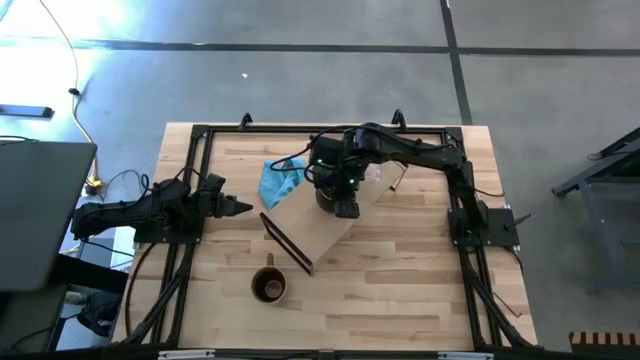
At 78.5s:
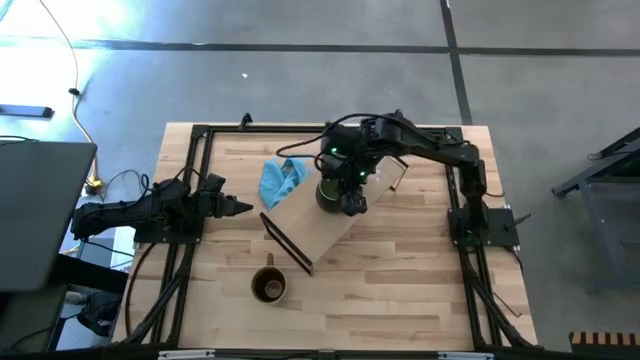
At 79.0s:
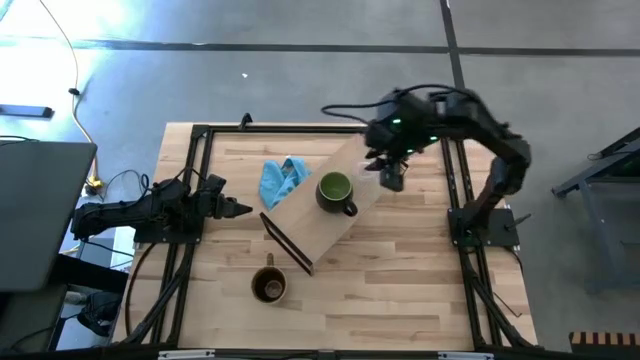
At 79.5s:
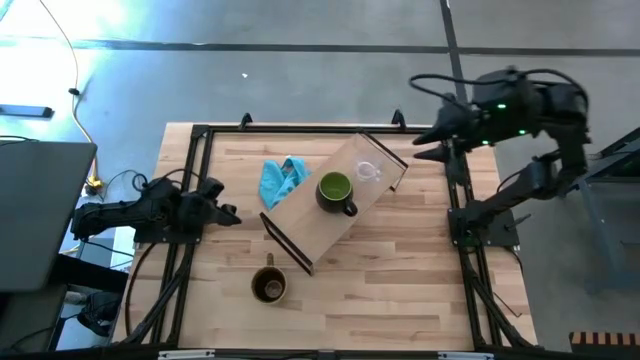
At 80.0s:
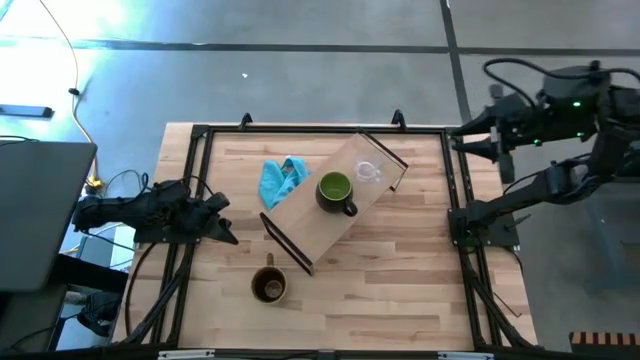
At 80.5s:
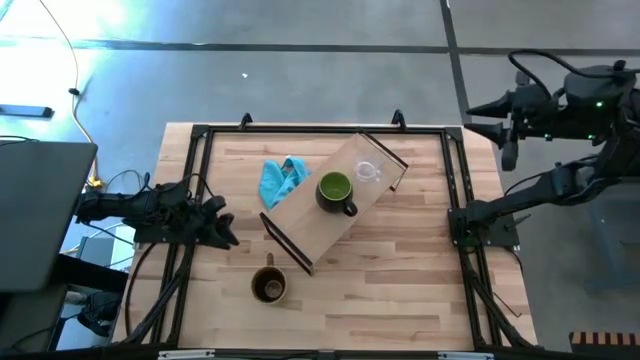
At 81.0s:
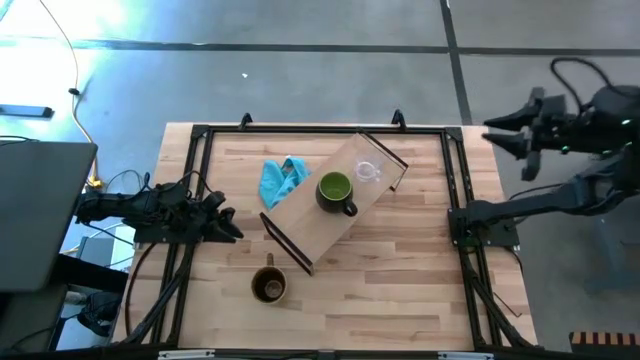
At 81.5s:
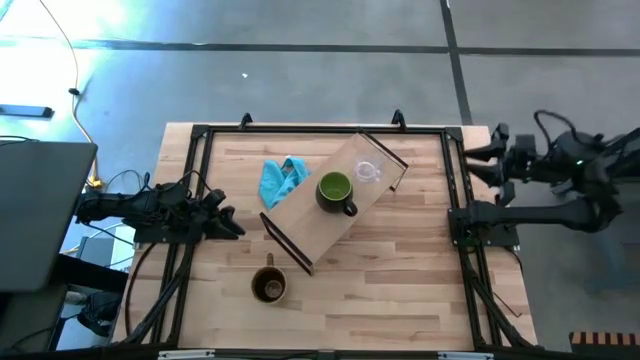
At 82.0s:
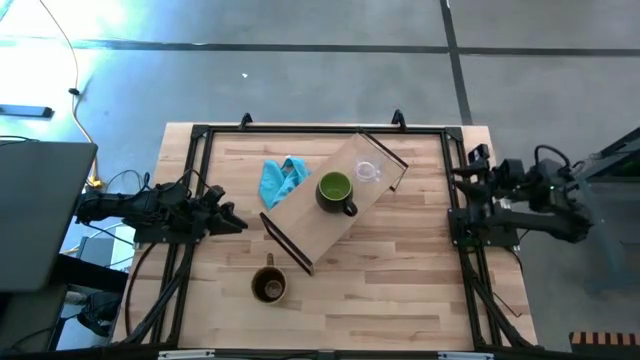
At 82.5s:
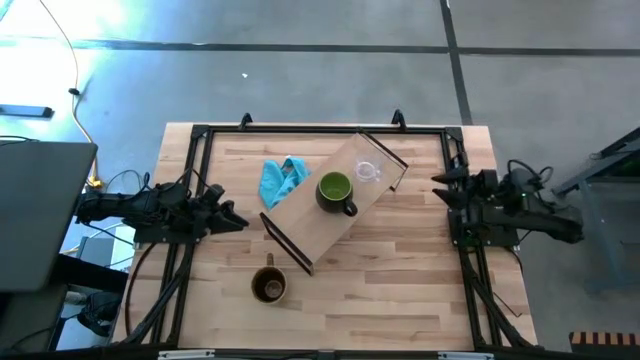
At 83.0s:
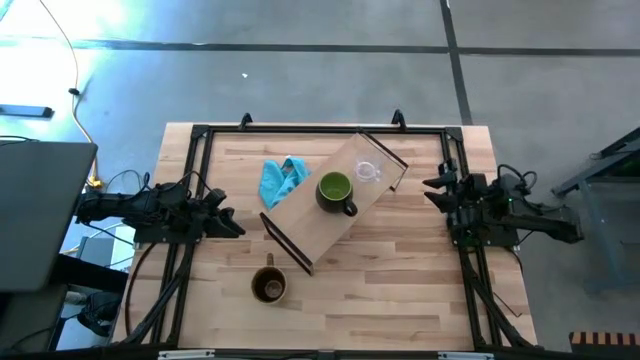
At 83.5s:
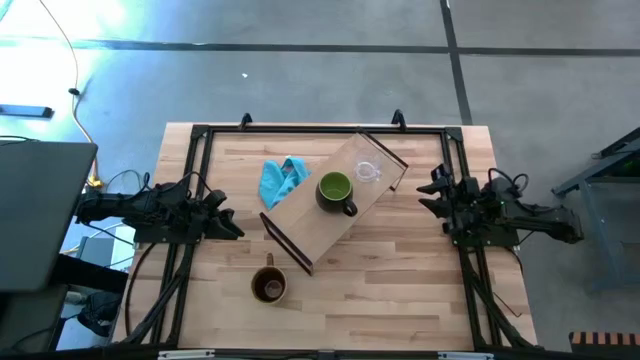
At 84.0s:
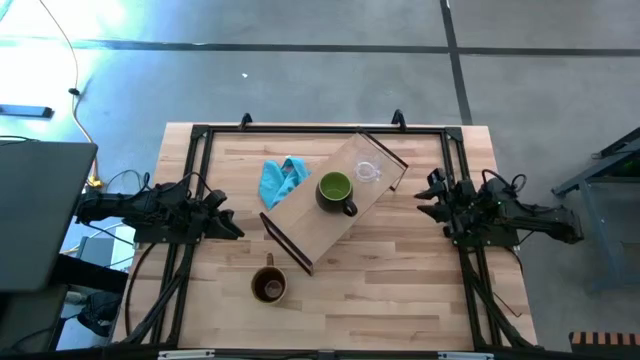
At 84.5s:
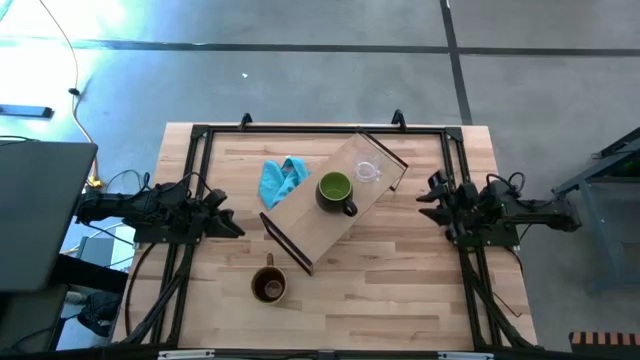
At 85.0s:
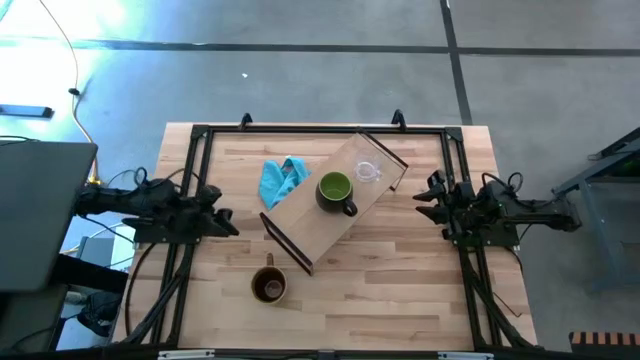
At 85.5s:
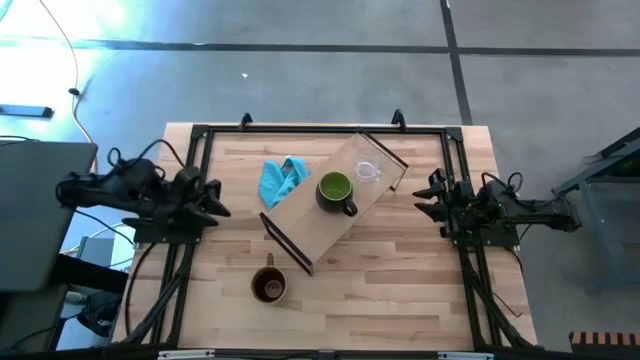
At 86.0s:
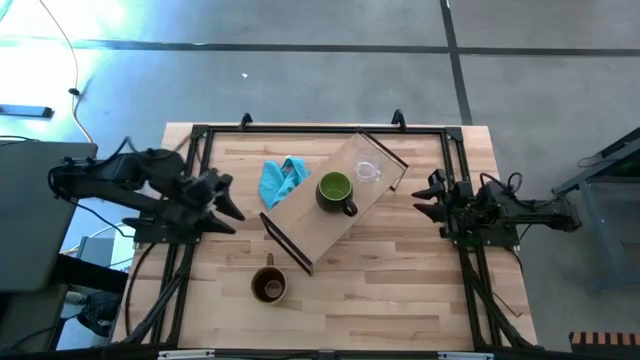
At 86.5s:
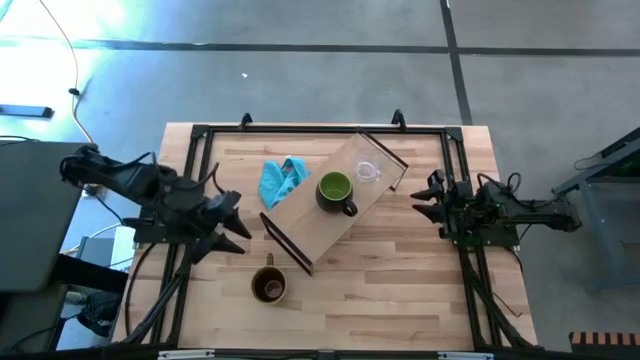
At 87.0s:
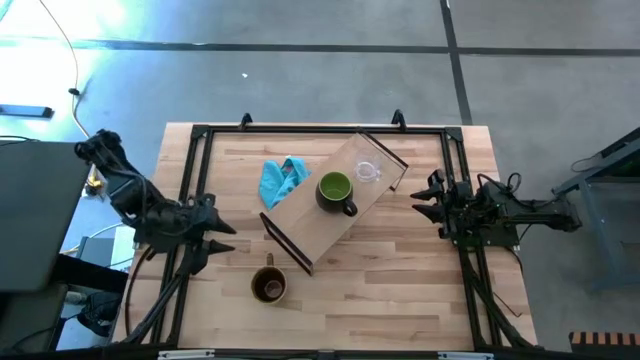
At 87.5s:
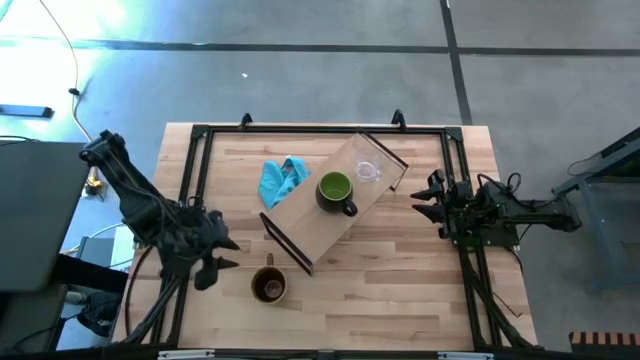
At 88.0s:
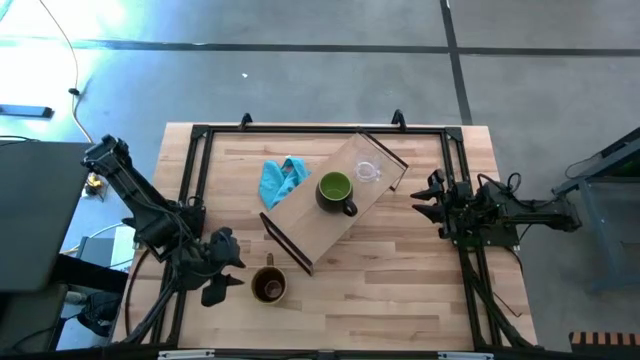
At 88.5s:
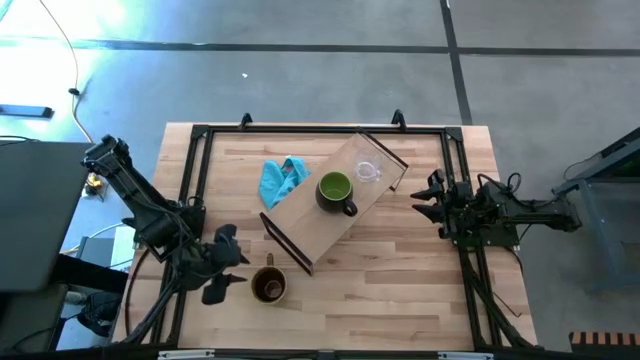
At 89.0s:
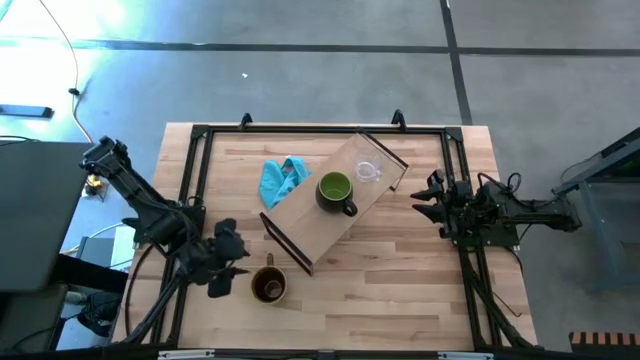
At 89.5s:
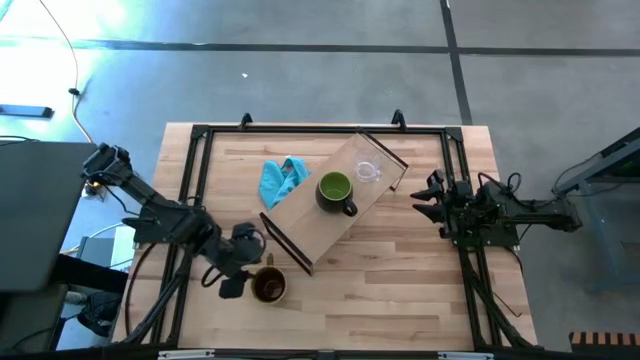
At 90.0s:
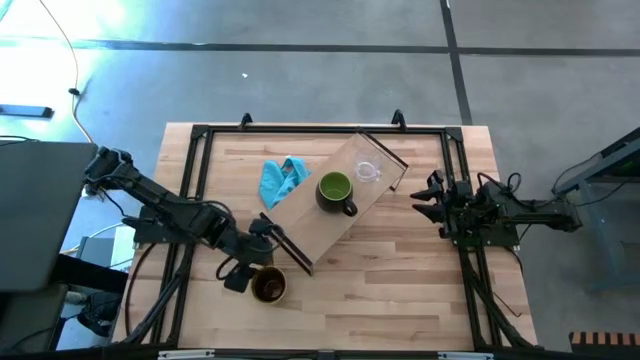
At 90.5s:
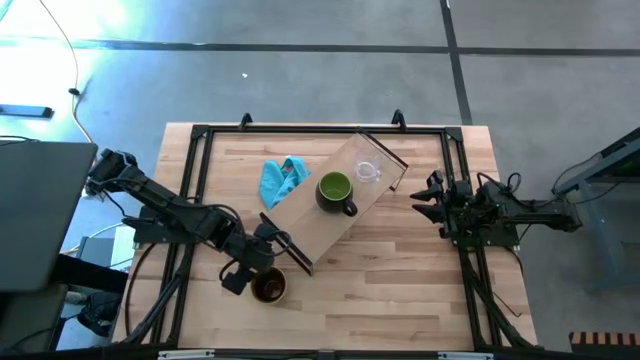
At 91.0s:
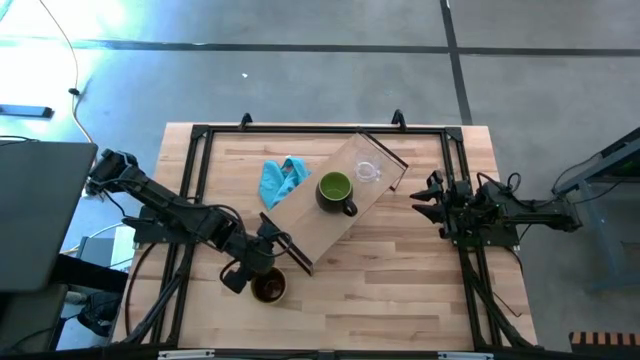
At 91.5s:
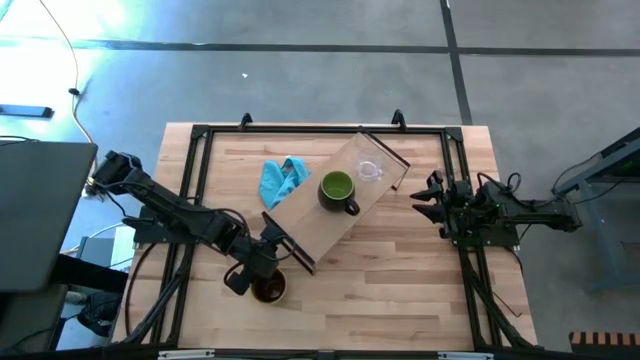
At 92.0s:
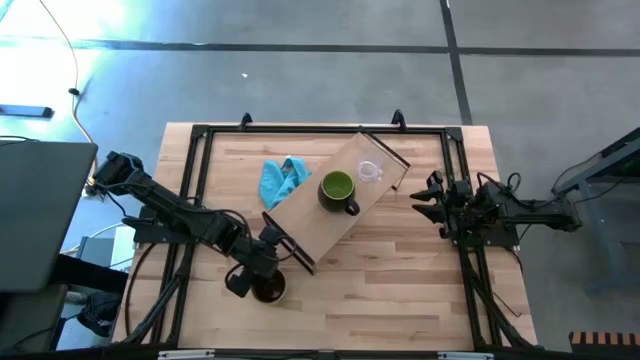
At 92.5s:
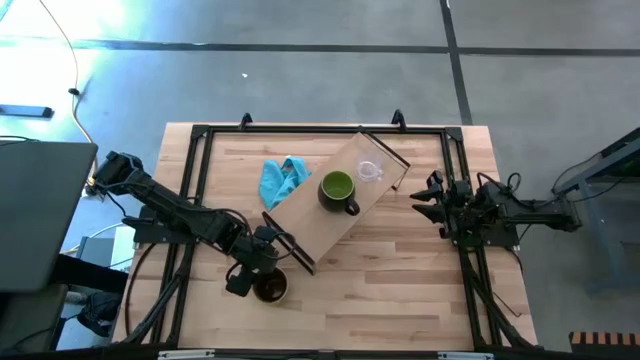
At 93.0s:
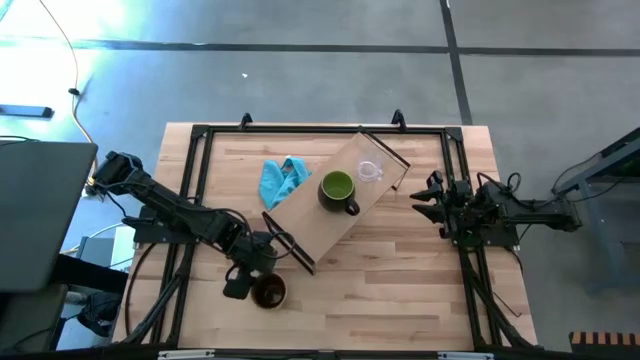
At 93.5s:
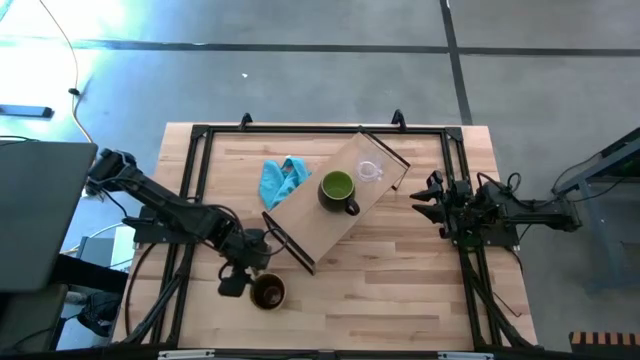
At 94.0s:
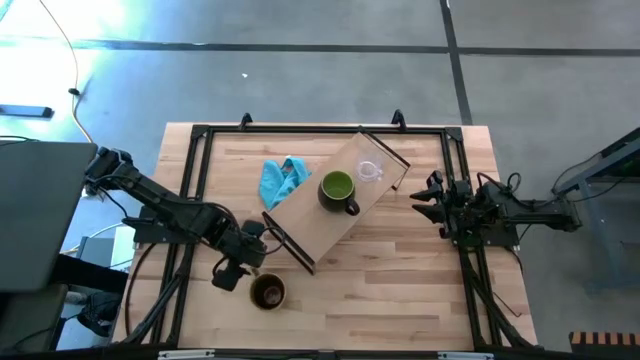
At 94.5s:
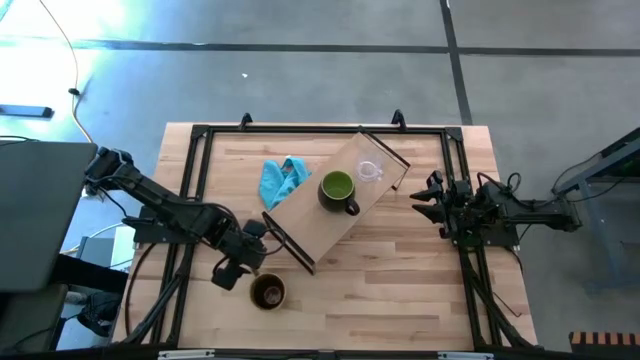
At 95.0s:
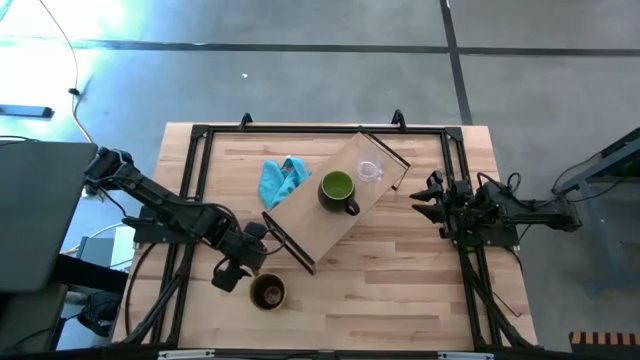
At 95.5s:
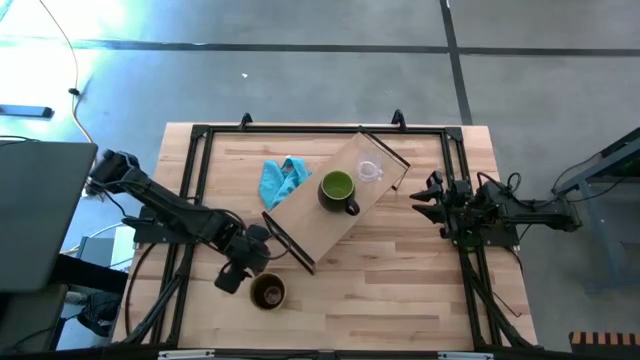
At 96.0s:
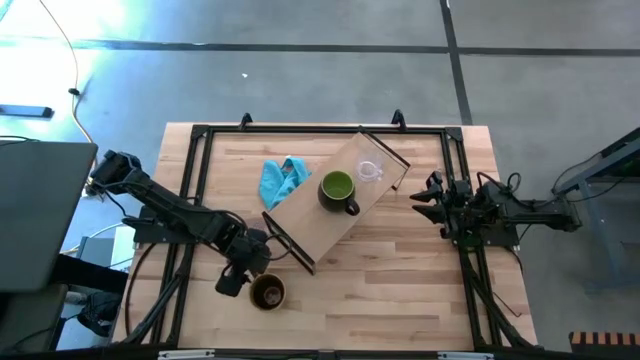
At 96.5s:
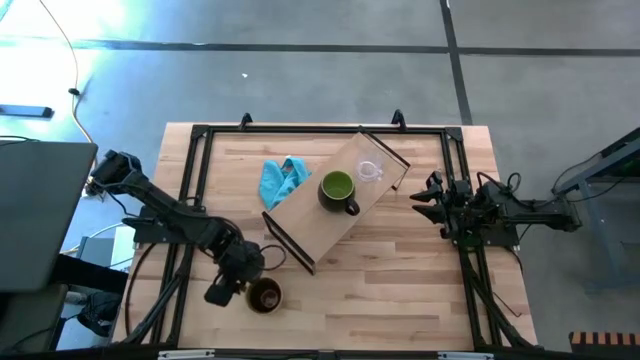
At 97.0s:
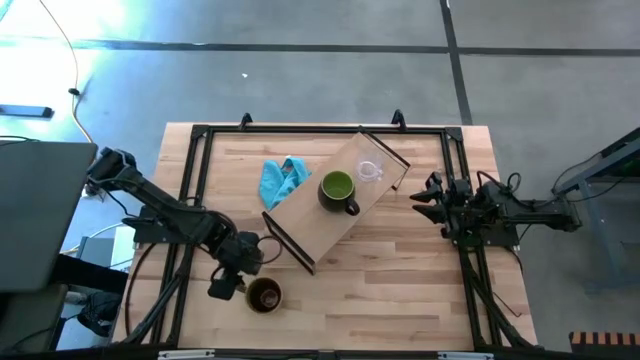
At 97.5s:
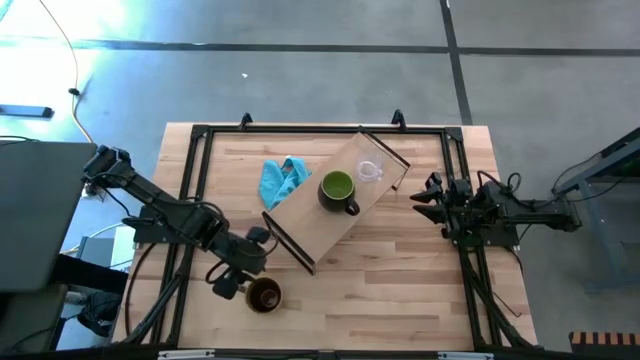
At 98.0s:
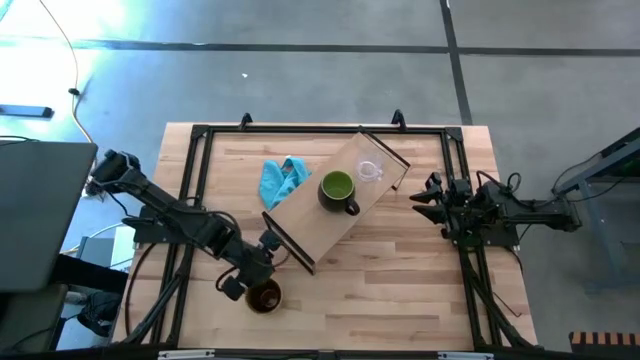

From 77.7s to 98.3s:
Task: Stack small to large cups/mugs on shelf
Put the green mug on the shelf
